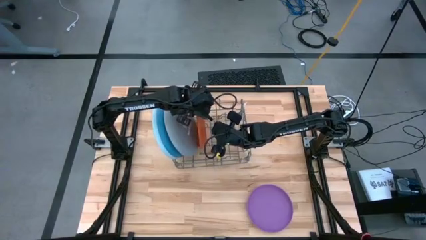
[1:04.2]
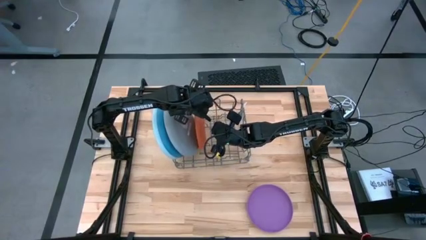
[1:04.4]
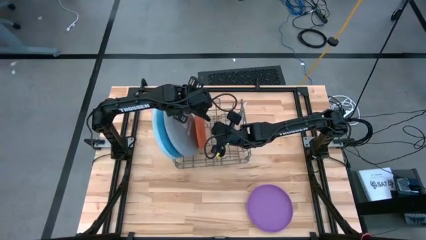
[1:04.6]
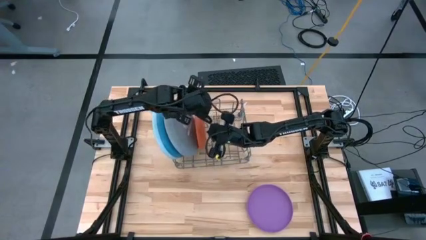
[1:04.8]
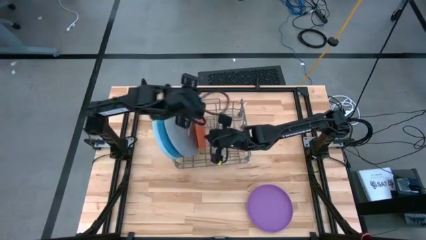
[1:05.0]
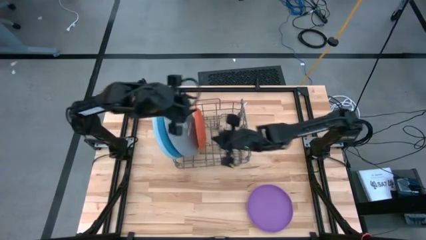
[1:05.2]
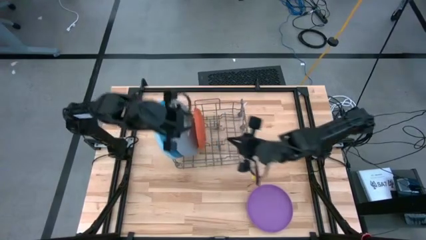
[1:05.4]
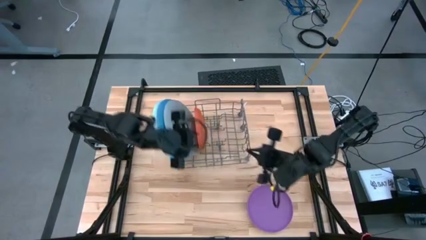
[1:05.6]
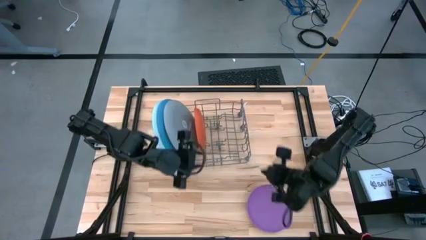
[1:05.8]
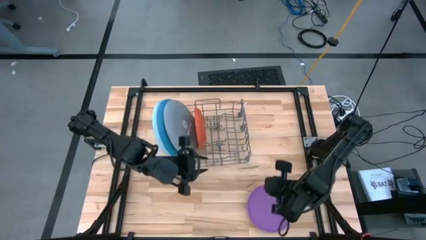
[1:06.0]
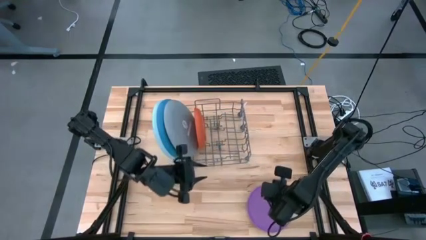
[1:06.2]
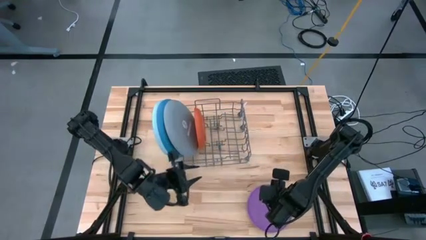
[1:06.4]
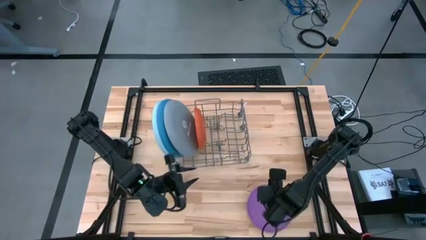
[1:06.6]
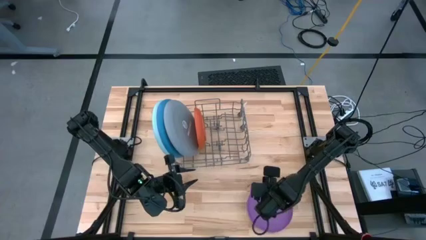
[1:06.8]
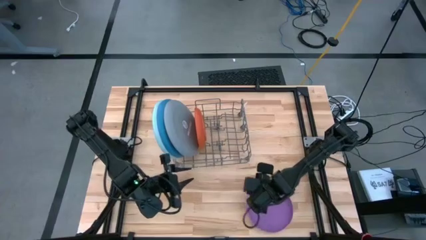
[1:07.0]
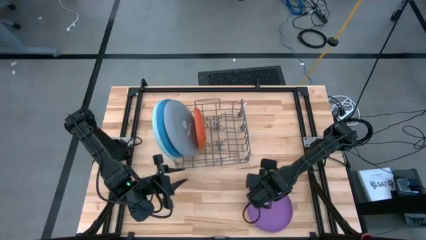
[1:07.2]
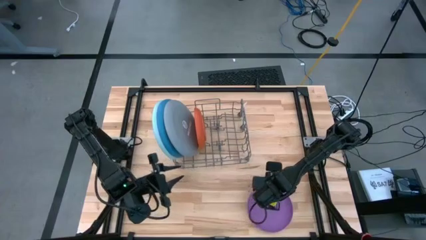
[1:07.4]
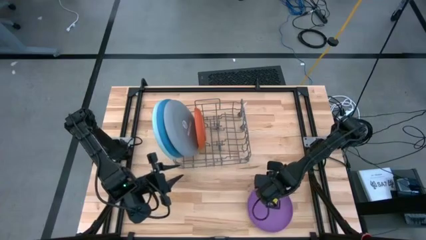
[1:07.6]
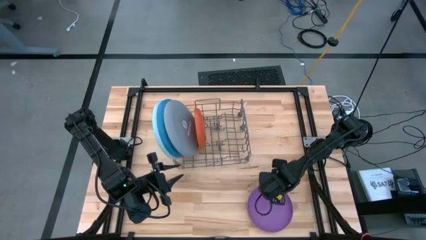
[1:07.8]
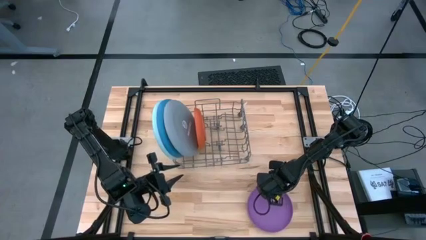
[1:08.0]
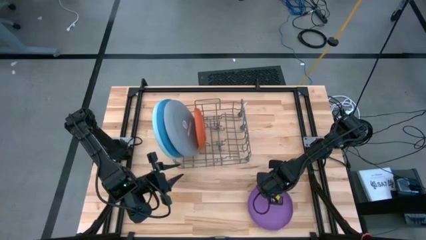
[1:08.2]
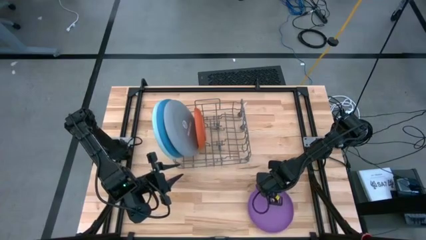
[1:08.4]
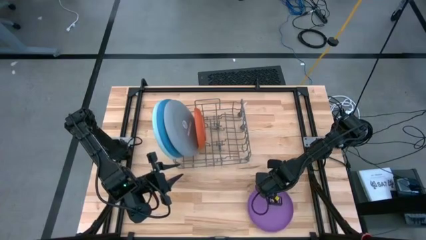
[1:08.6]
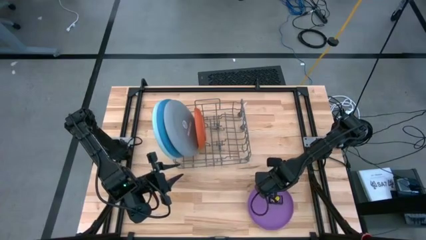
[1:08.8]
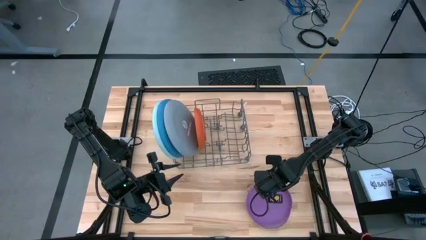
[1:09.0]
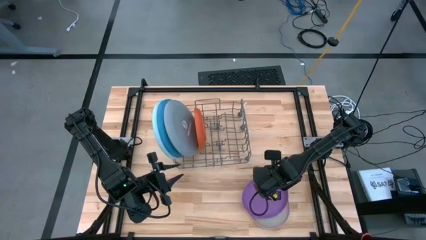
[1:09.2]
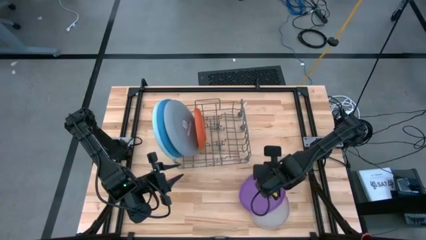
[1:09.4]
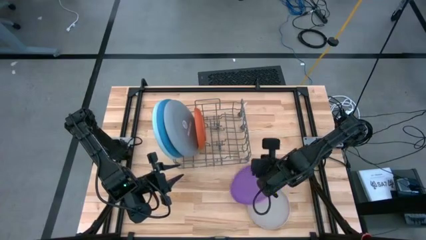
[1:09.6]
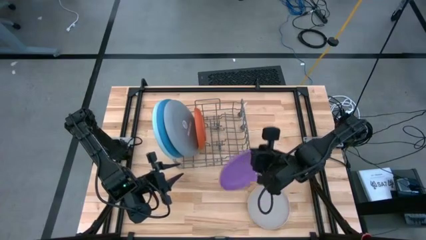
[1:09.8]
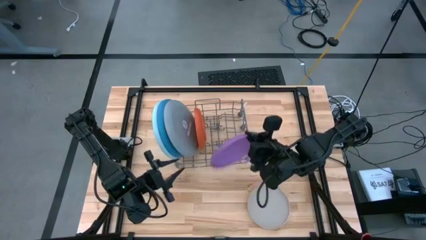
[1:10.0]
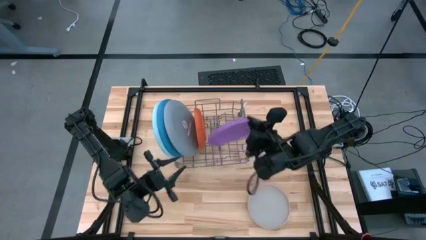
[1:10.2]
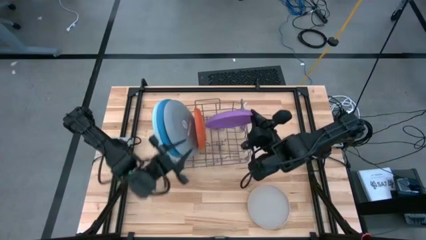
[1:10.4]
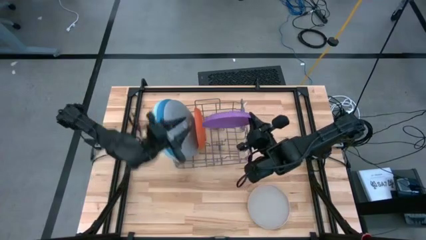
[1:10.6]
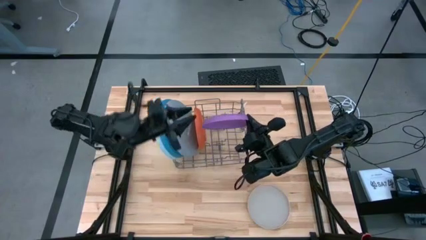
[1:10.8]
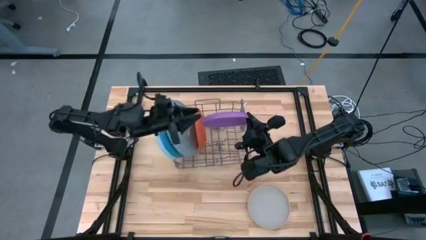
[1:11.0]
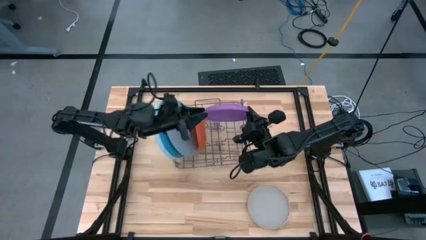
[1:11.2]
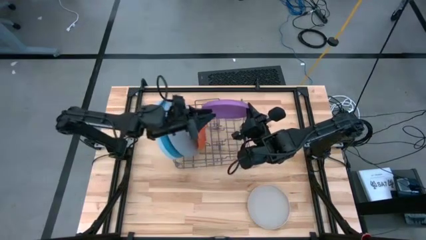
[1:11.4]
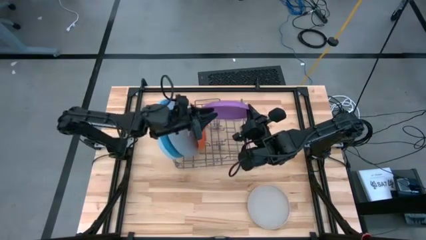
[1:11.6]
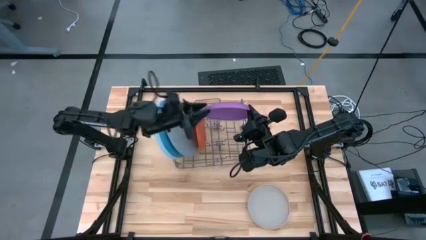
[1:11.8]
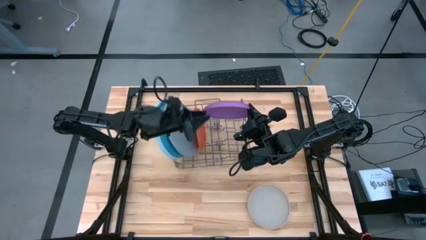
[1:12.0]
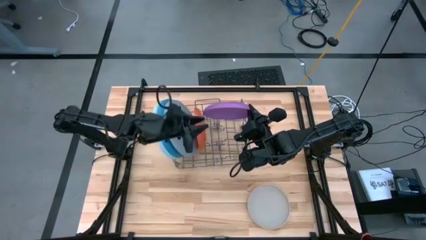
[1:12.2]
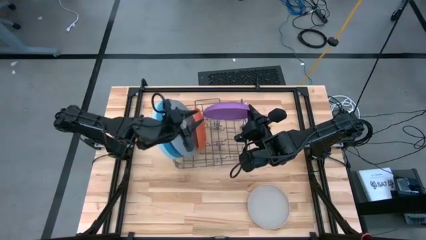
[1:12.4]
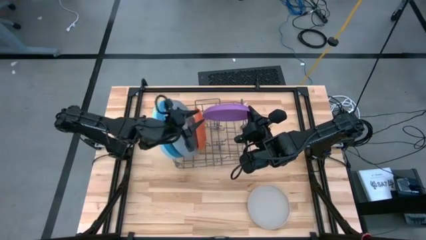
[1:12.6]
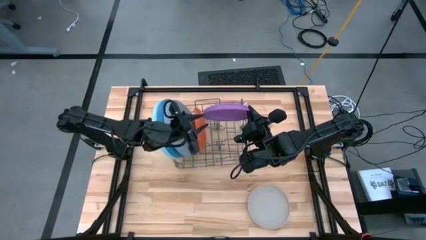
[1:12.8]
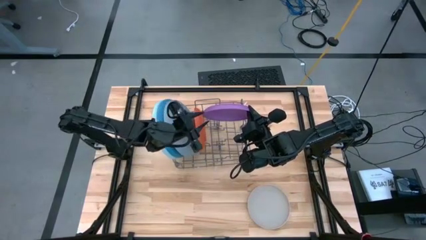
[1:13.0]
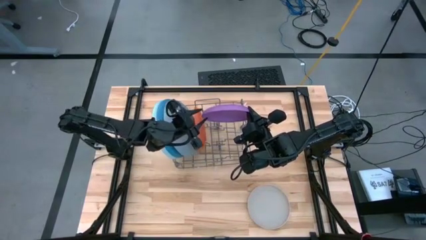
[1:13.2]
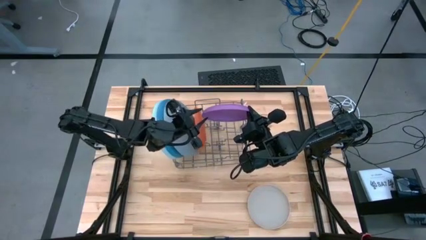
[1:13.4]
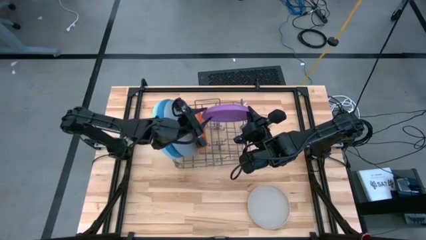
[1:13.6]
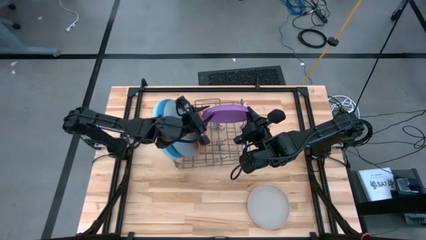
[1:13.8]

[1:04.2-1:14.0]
Task: Sort dishes
Put the purple plate in the dish rack

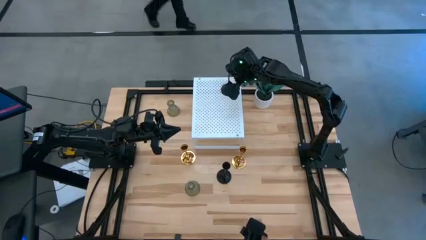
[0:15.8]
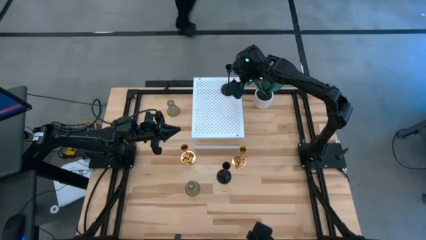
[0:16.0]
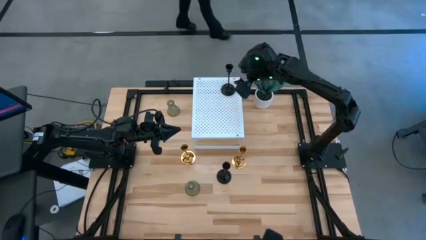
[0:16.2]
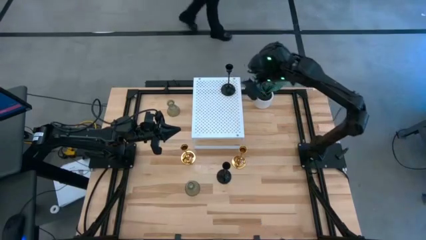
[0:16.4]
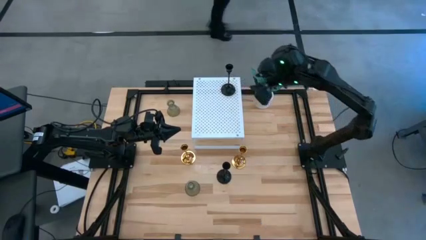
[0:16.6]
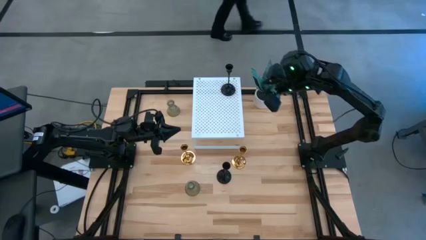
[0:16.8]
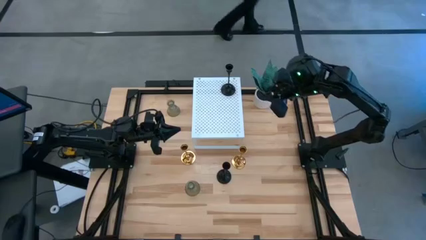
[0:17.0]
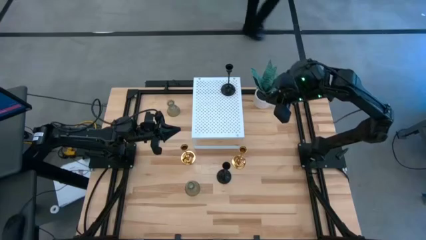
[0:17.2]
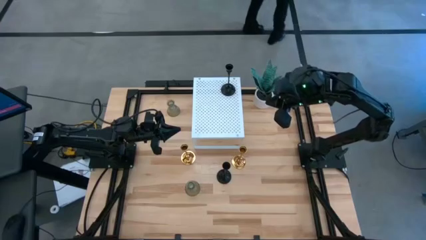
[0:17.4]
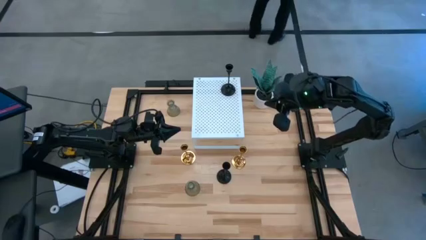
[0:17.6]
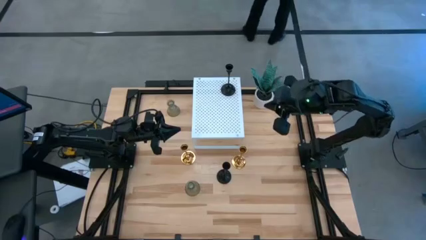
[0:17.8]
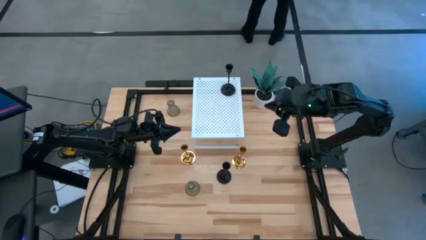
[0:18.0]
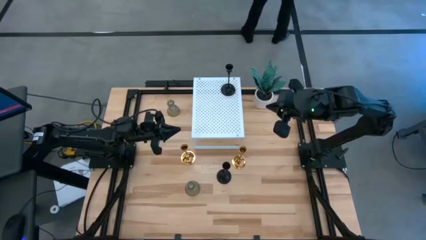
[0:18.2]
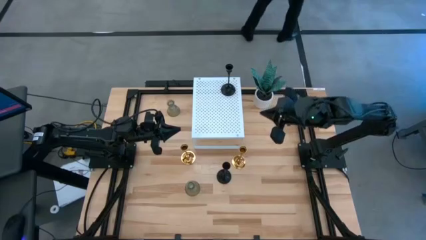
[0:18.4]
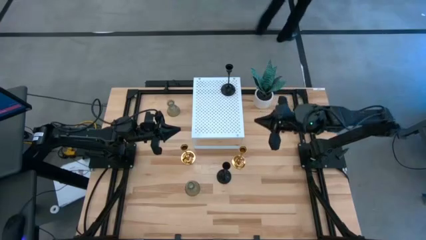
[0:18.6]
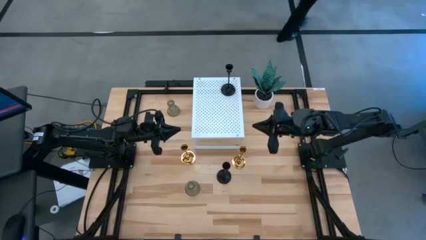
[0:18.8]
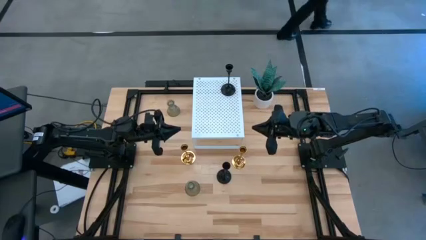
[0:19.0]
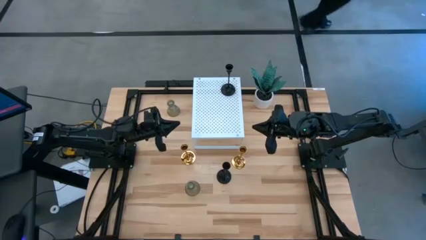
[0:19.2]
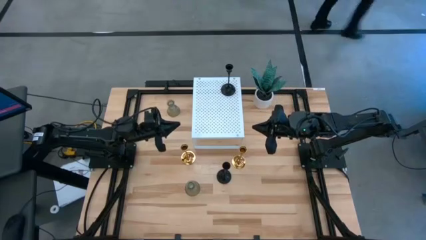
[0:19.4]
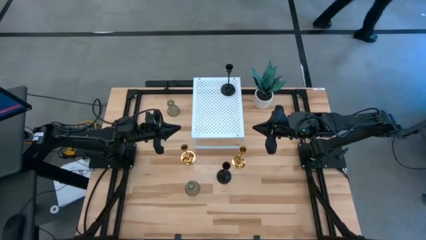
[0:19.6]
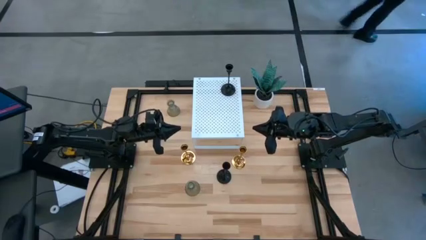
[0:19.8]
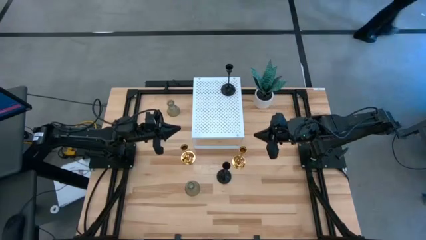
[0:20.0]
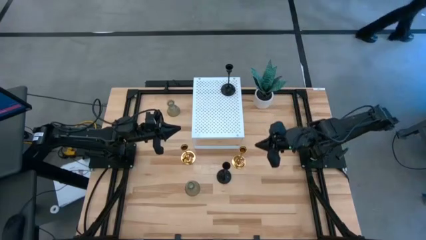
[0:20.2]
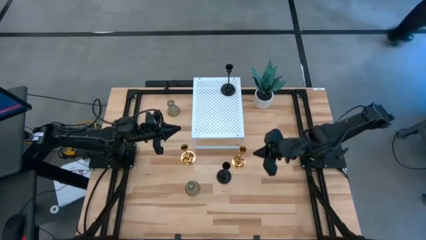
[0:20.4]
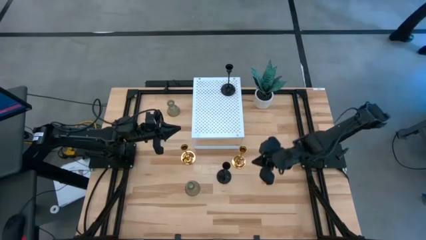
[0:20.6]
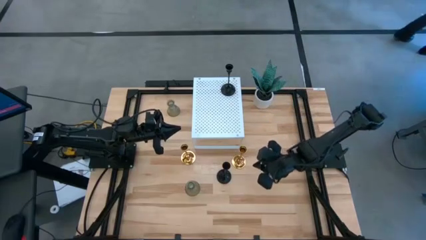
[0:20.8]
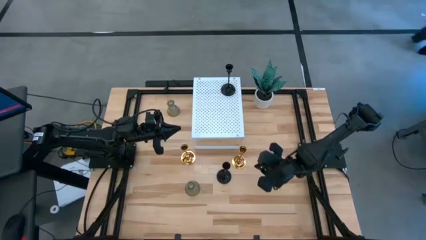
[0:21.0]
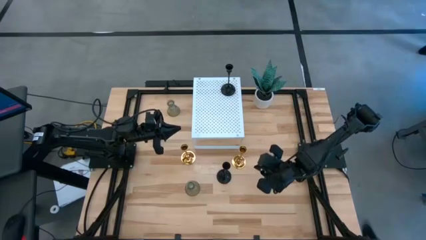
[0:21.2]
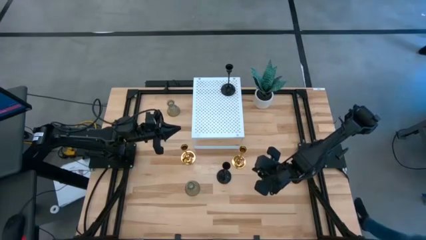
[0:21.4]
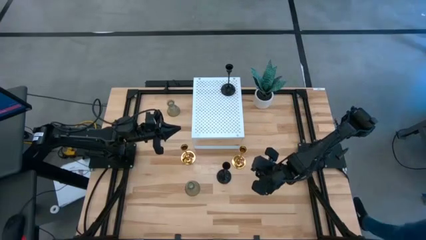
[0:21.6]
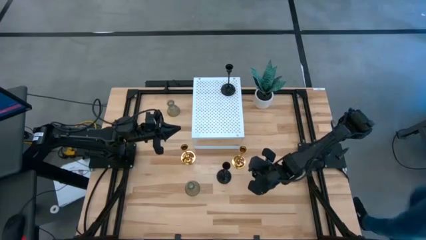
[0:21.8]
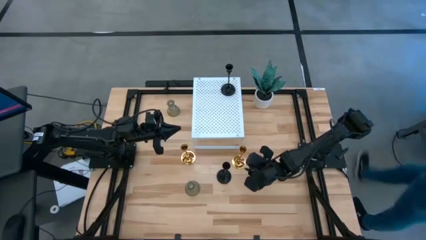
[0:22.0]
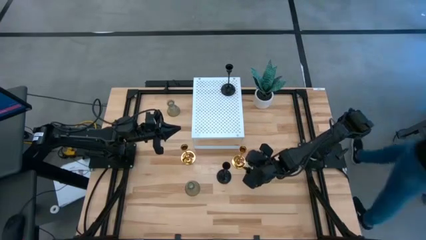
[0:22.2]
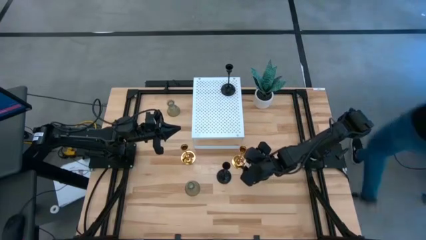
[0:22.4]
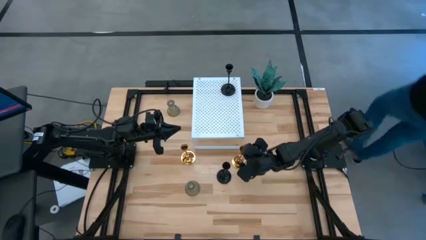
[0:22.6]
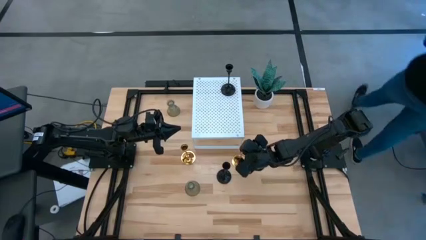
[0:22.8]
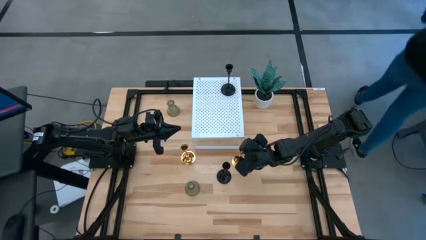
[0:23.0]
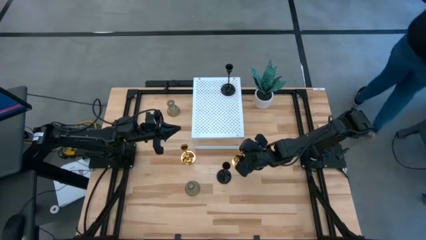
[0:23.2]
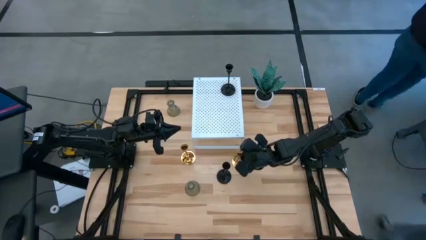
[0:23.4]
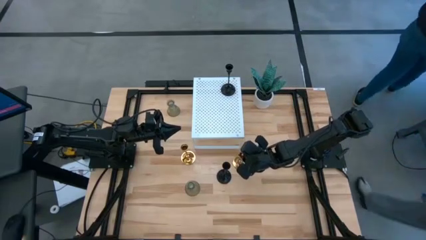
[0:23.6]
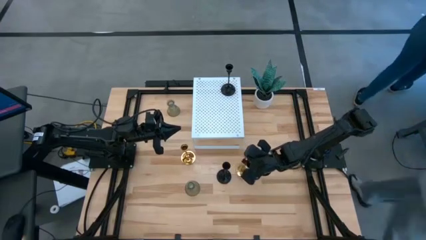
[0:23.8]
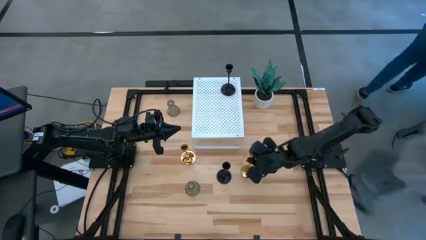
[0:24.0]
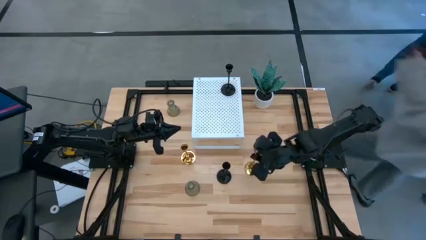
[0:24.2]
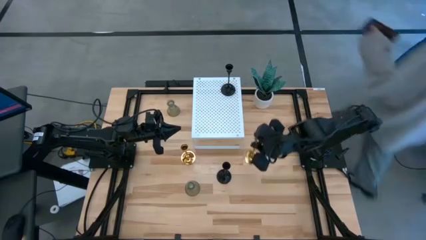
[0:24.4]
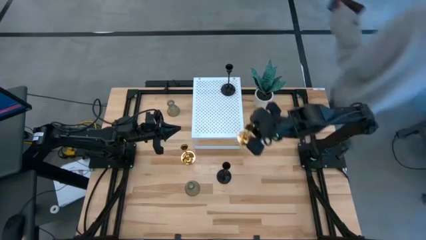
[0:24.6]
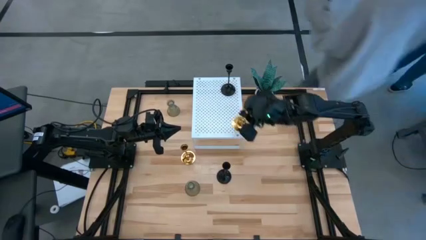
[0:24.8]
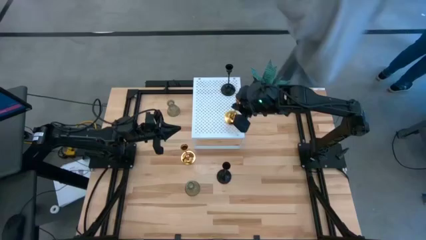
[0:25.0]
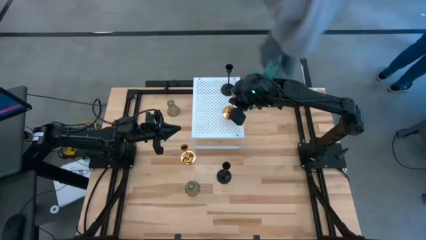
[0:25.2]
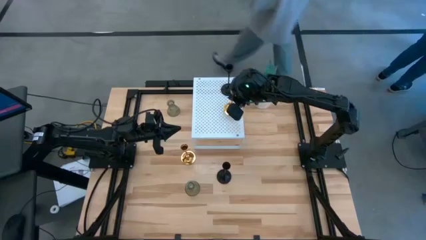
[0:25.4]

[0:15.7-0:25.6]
Task: Pick & Place candle stick holders
Put the right gold candle holder on the shelf
